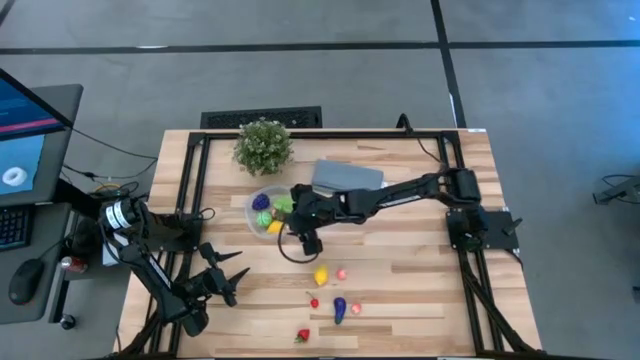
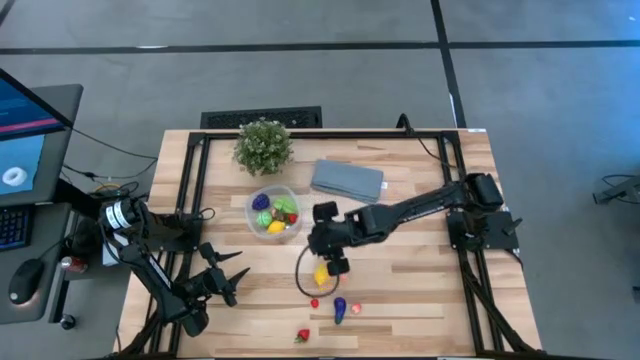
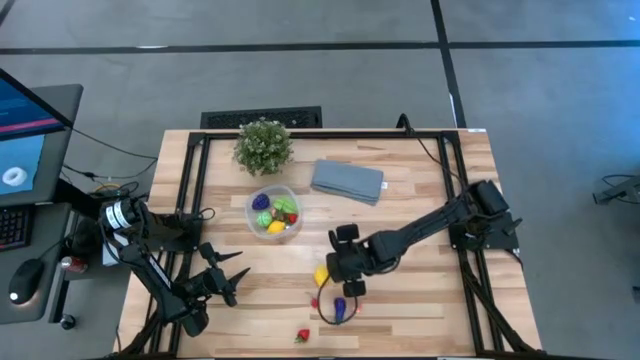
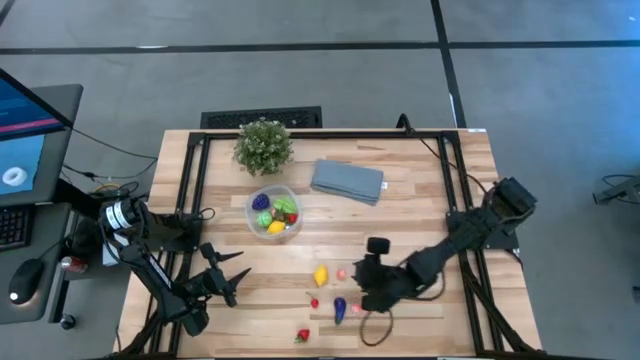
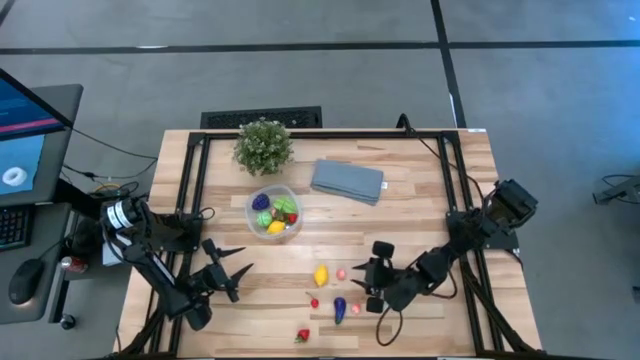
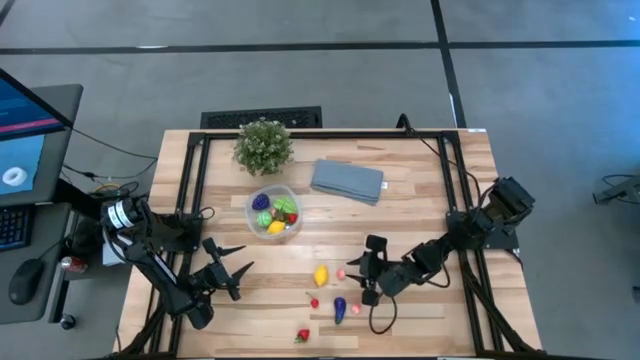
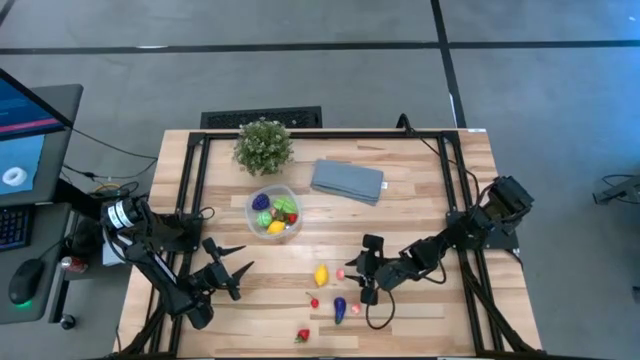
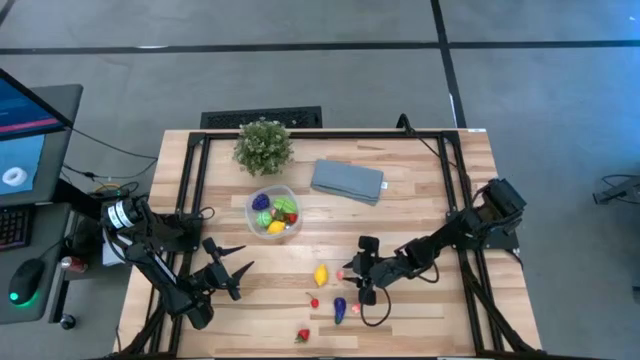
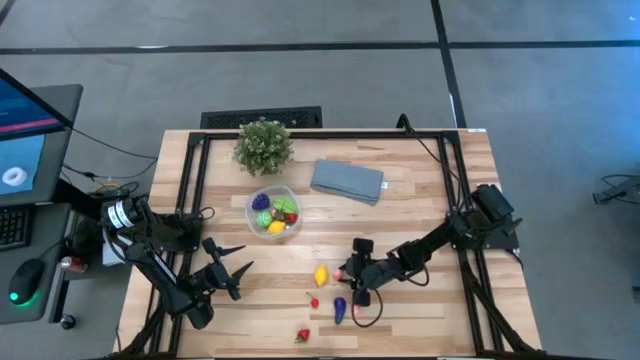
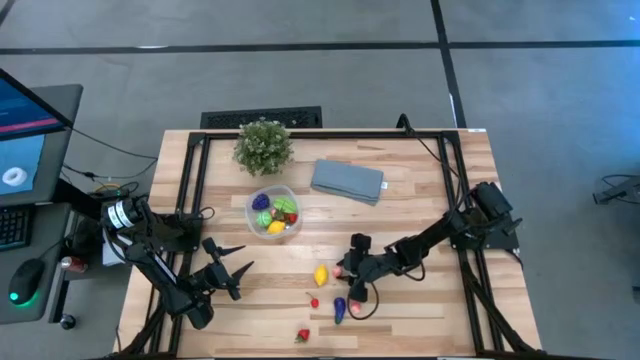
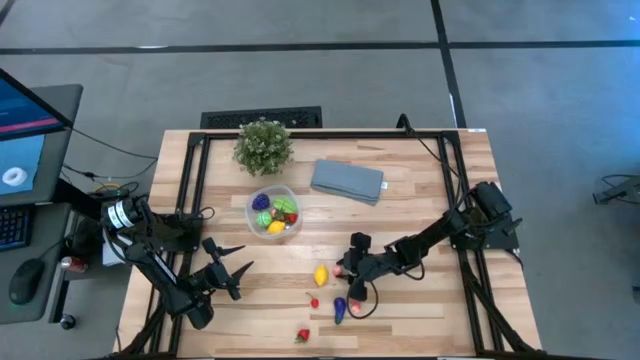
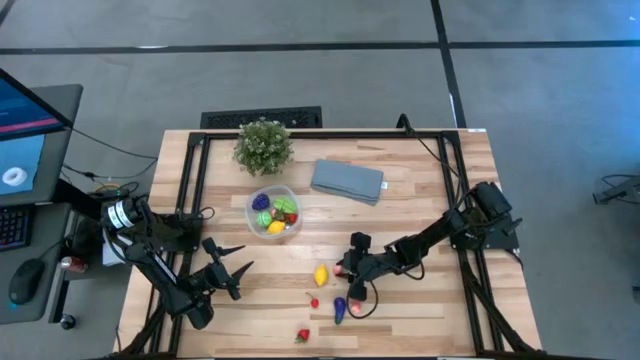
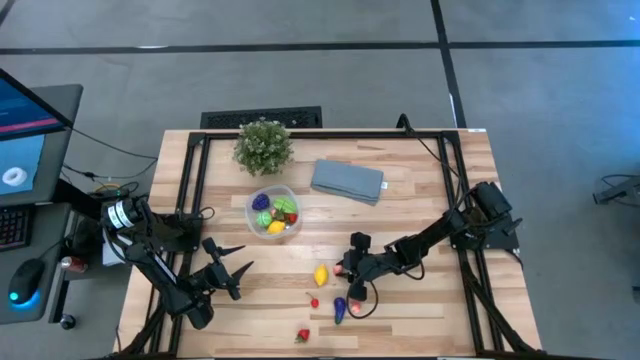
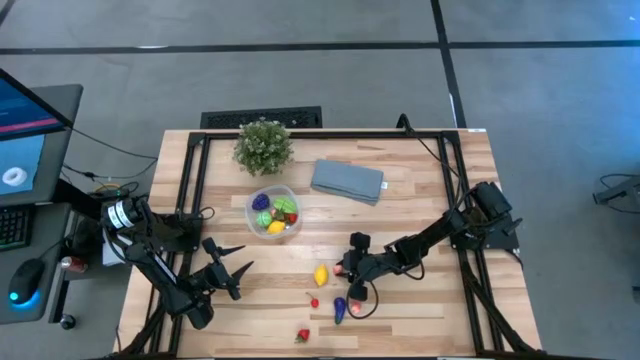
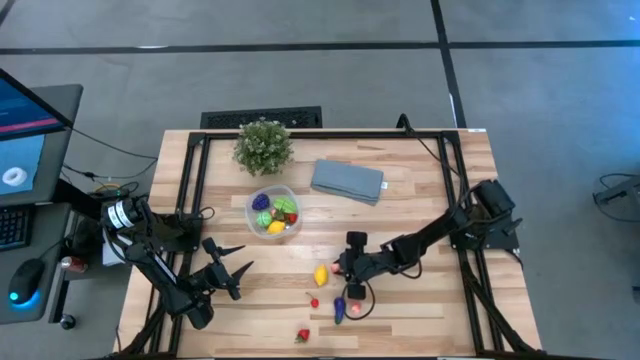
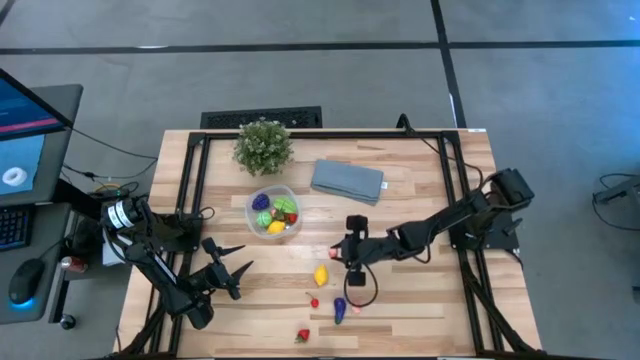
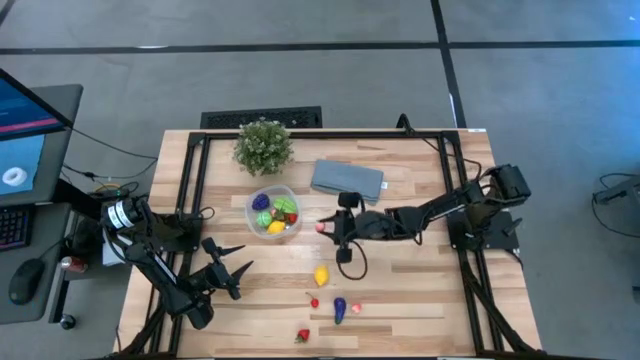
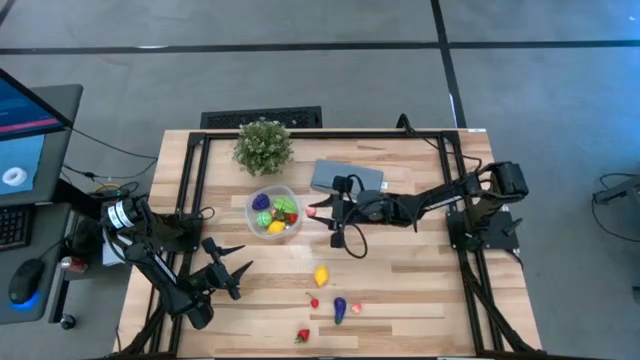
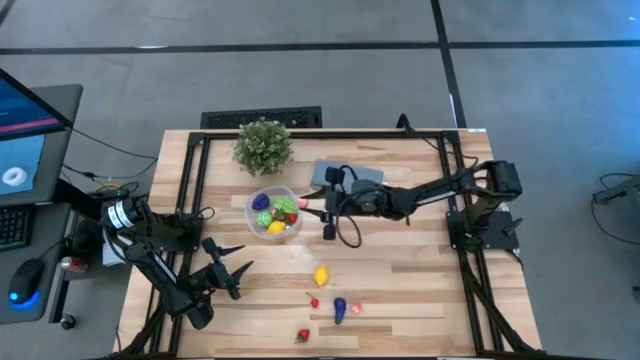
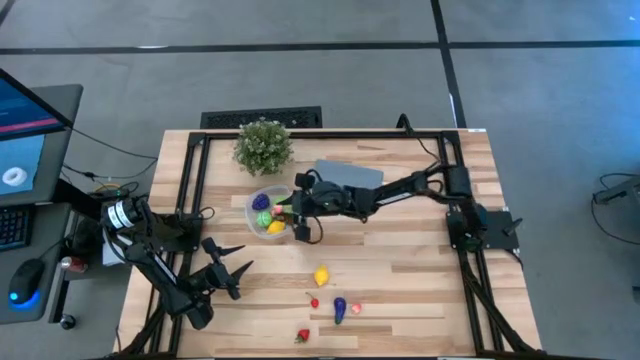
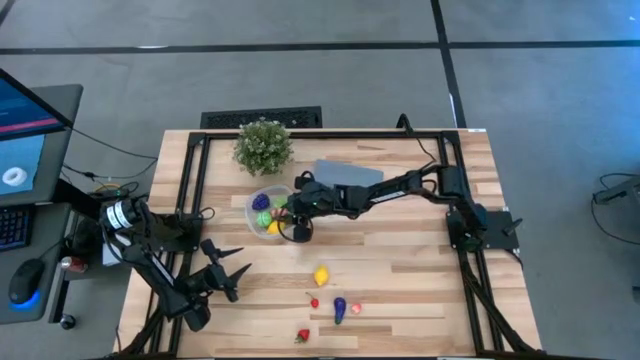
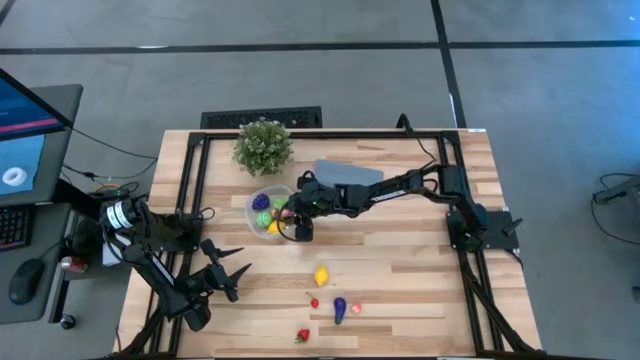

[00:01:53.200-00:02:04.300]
Task: Pick and placing Produce into tupperware
Put the top peach into the transparent bin

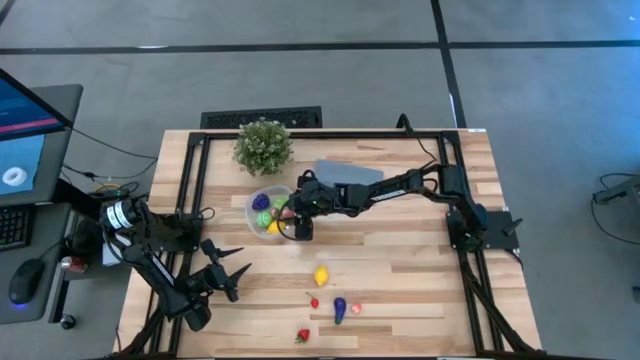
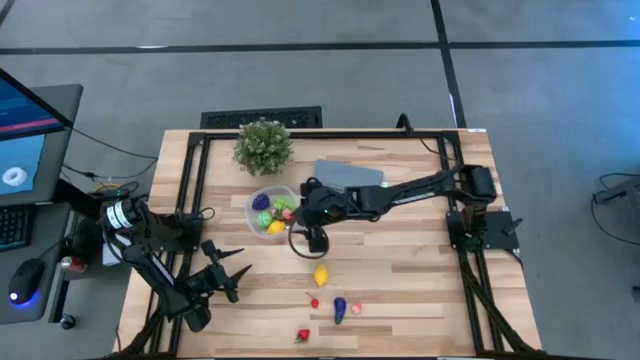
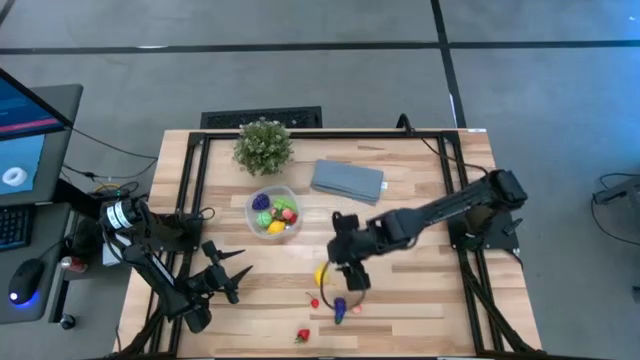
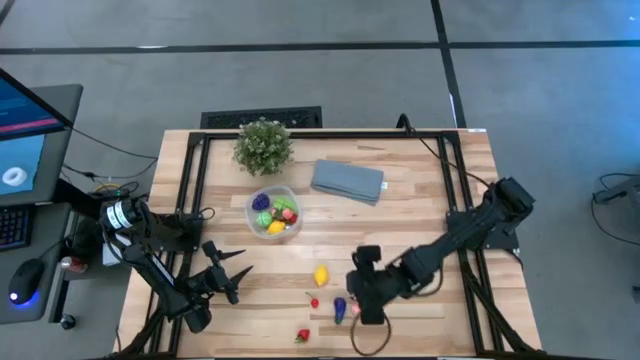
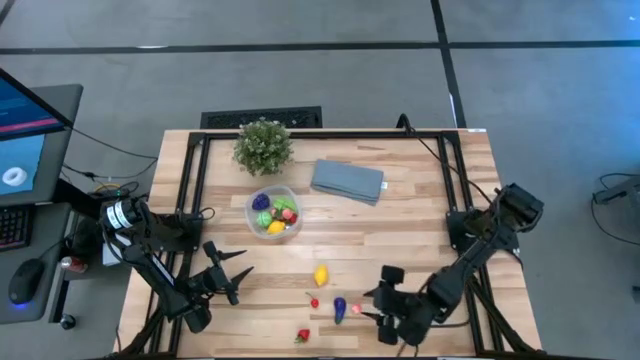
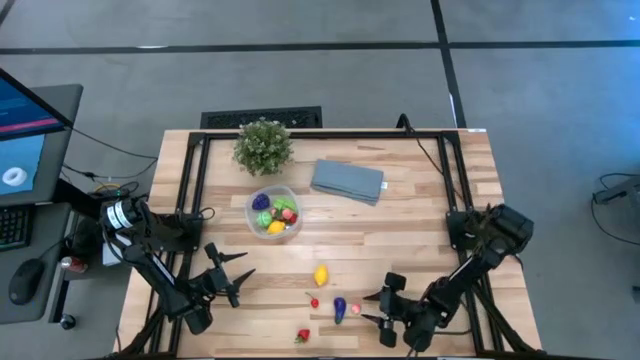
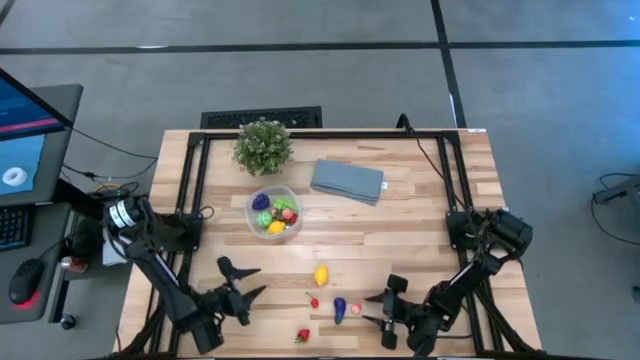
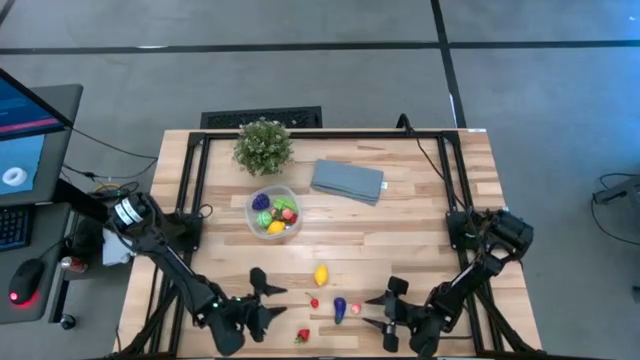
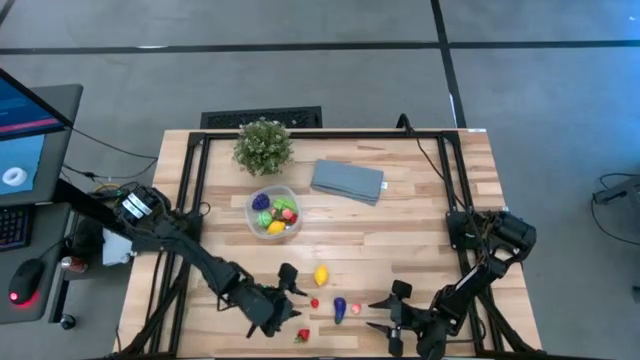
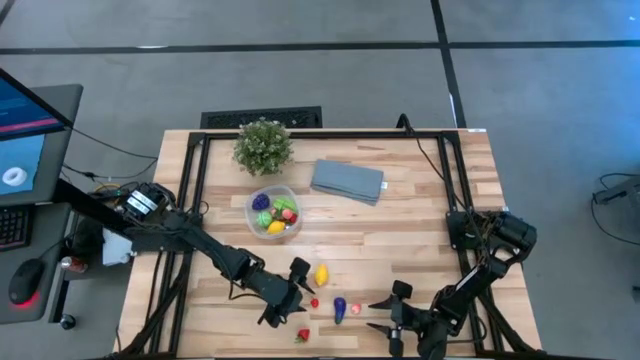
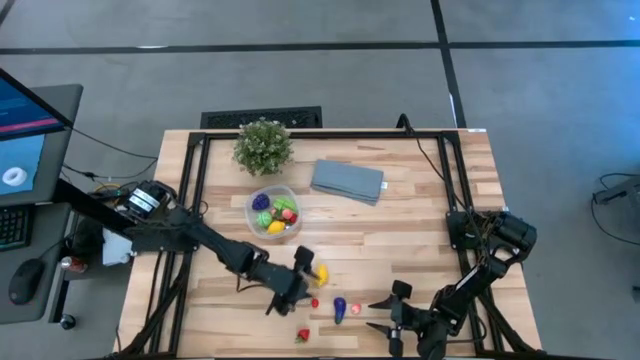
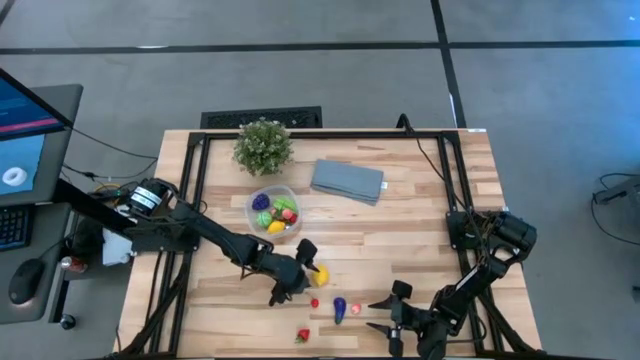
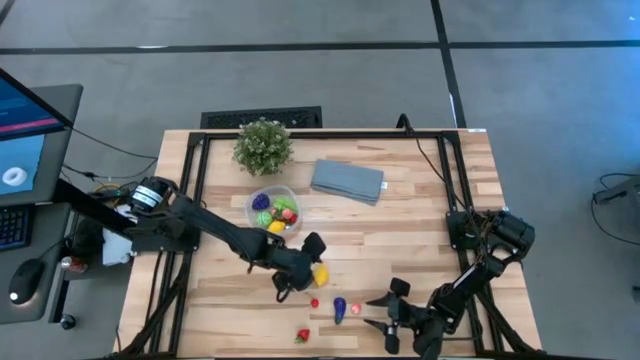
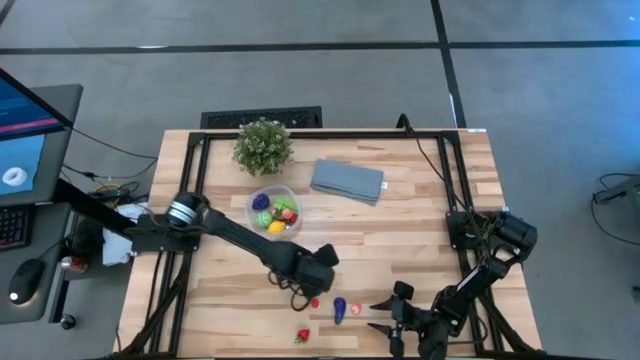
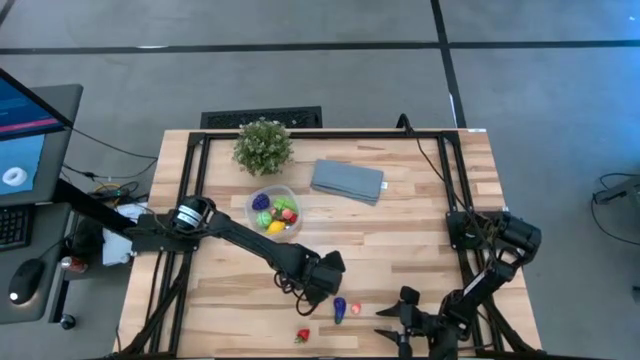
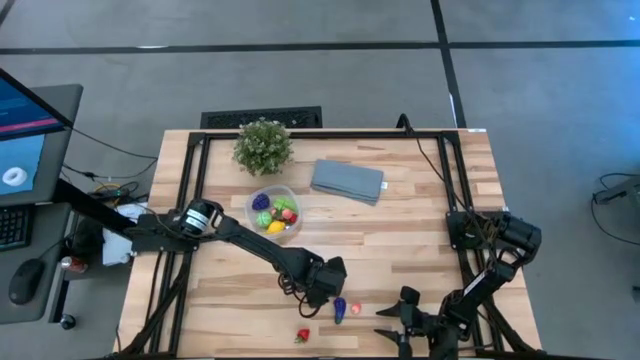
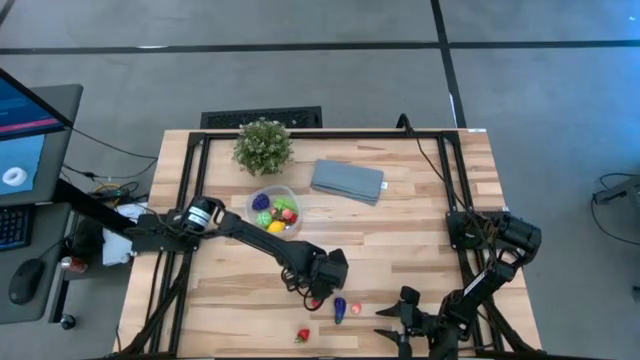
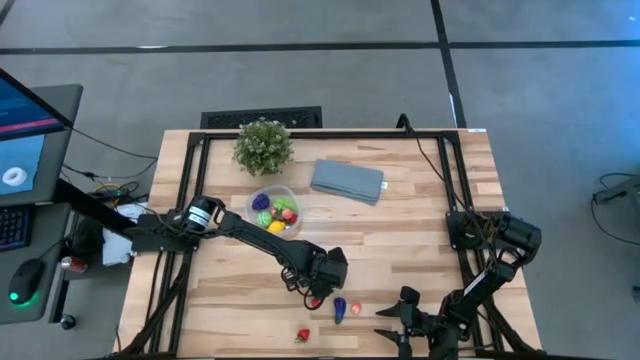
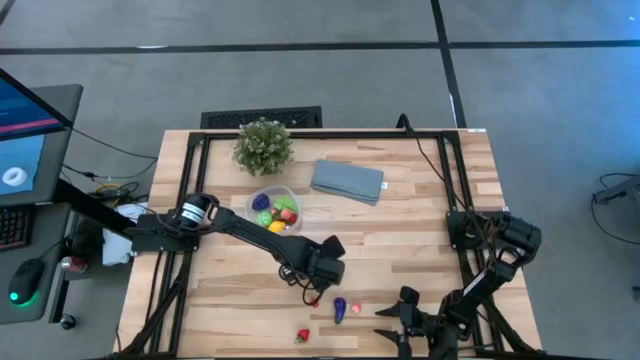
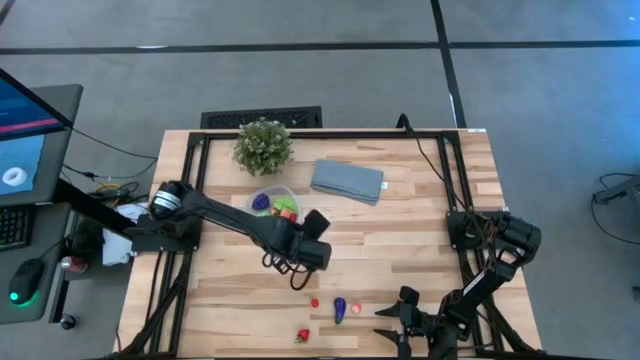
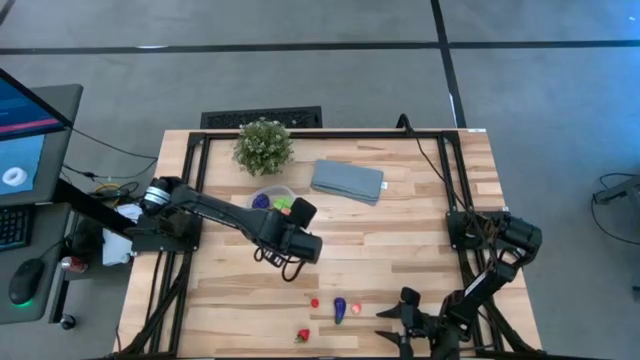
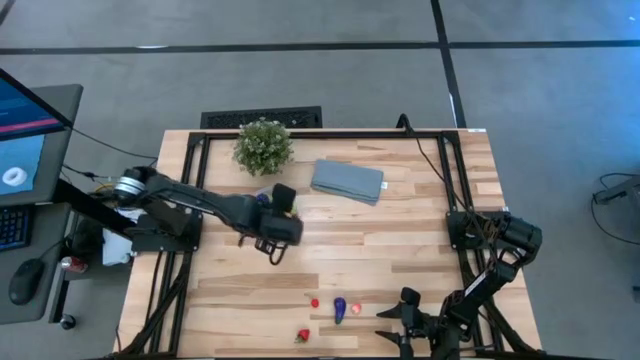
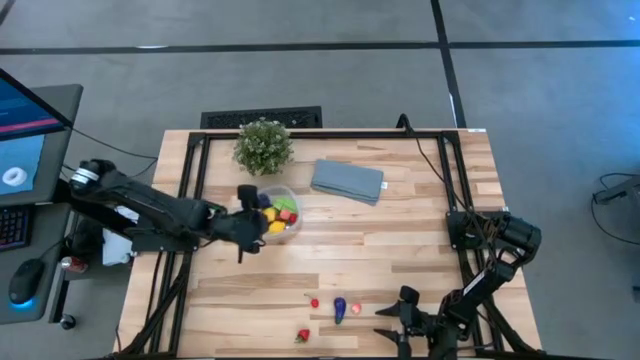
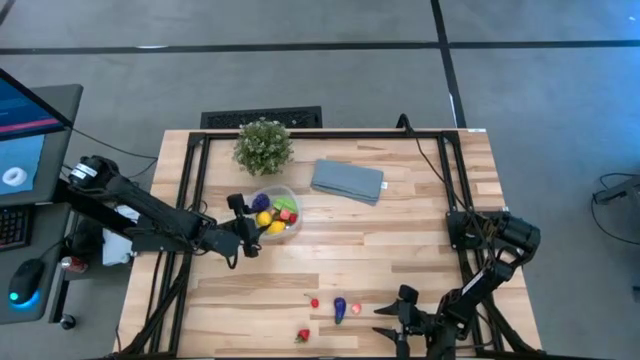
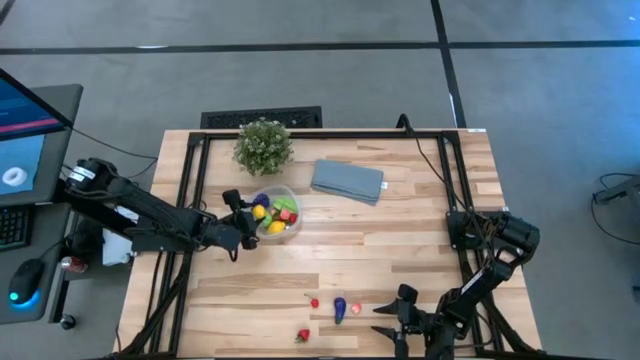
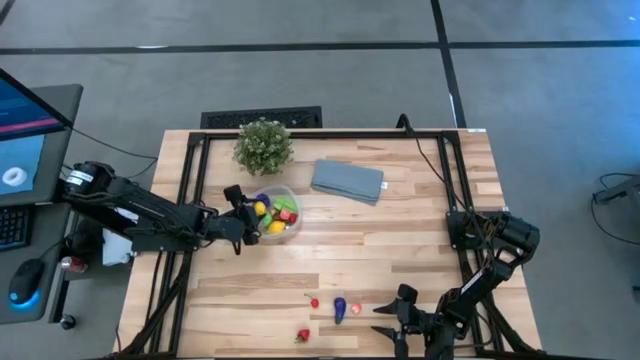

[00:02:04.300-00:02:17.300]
Put the yellow lemon into the transparent bin
